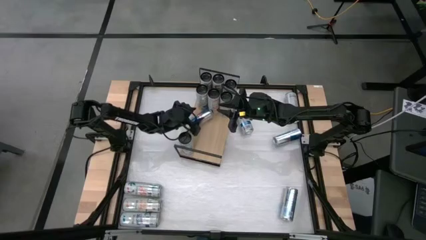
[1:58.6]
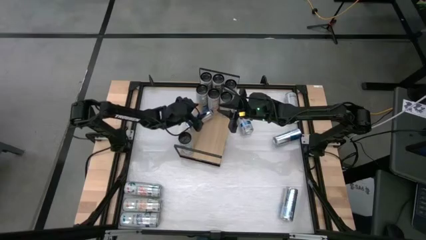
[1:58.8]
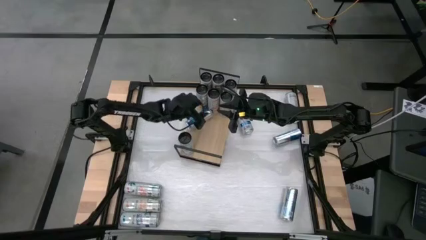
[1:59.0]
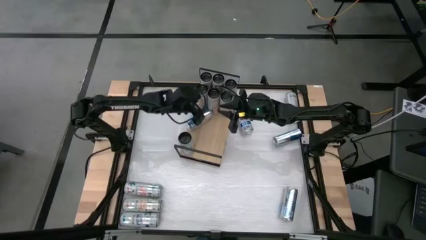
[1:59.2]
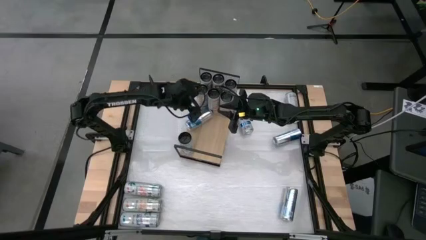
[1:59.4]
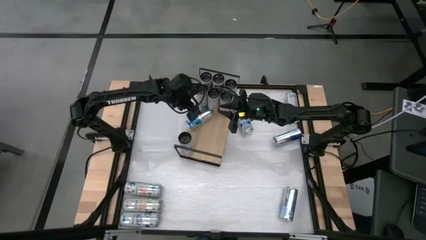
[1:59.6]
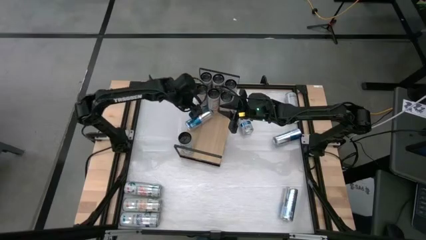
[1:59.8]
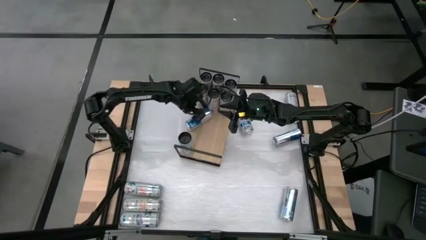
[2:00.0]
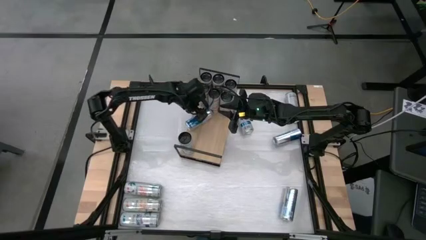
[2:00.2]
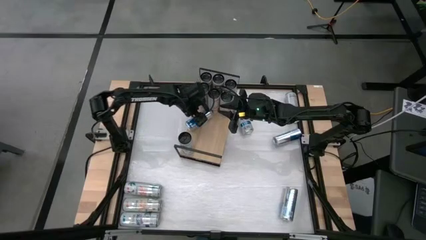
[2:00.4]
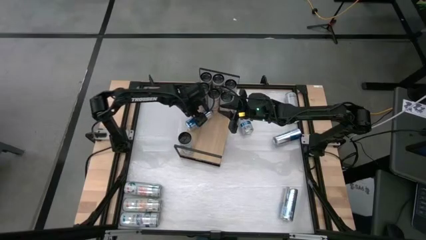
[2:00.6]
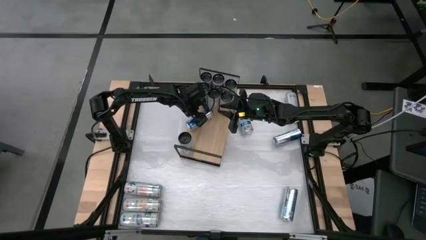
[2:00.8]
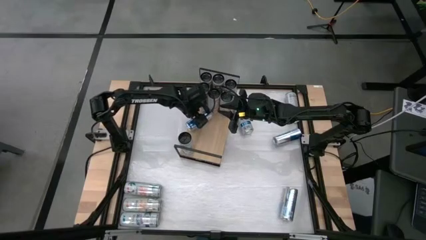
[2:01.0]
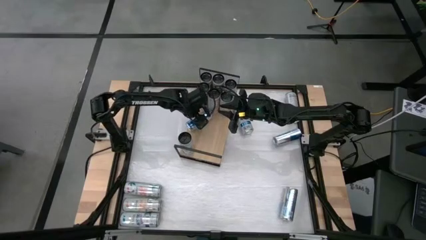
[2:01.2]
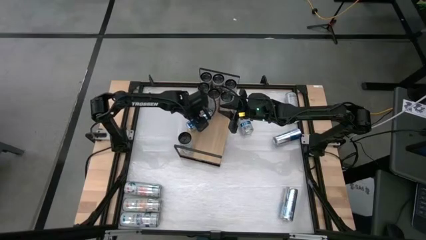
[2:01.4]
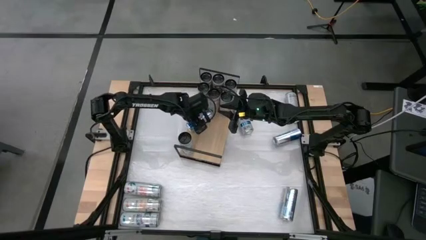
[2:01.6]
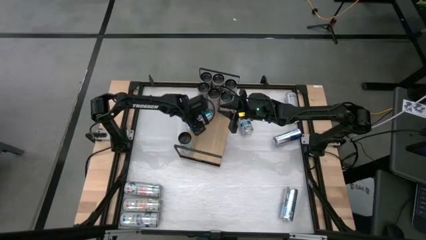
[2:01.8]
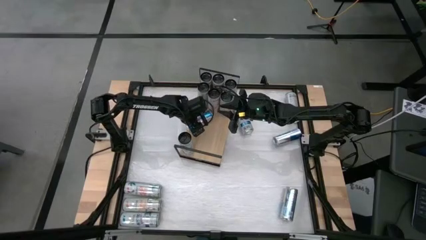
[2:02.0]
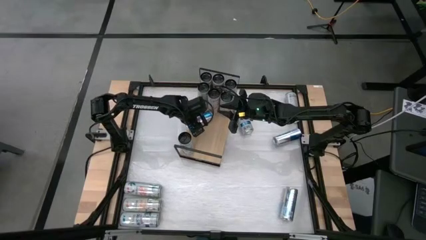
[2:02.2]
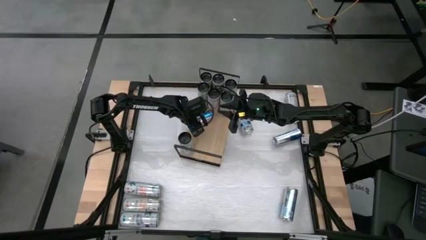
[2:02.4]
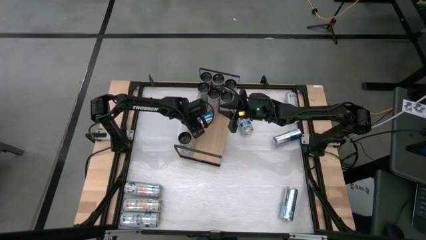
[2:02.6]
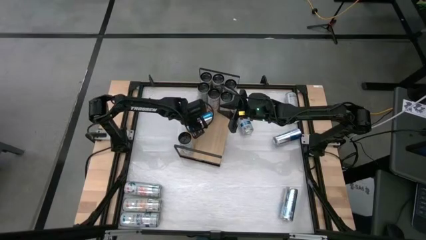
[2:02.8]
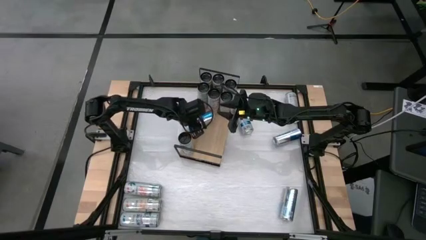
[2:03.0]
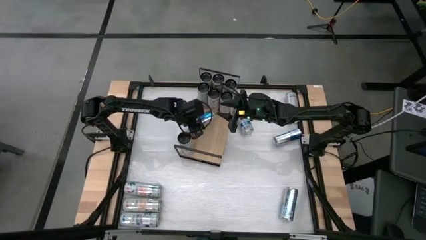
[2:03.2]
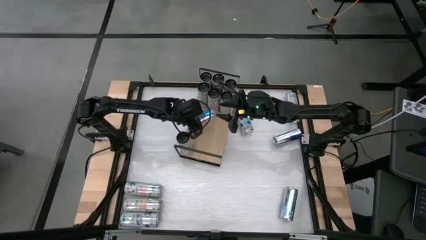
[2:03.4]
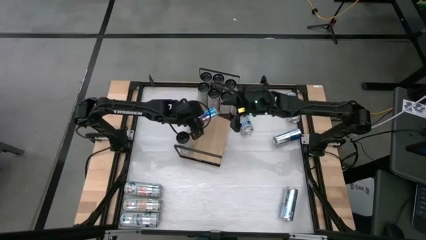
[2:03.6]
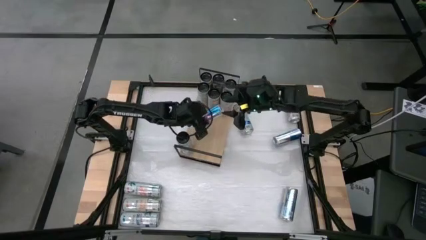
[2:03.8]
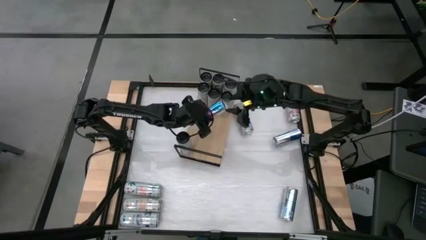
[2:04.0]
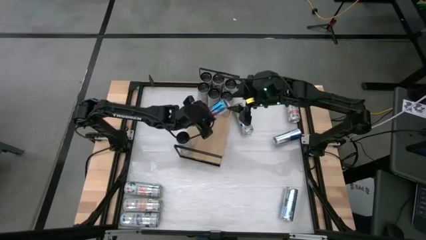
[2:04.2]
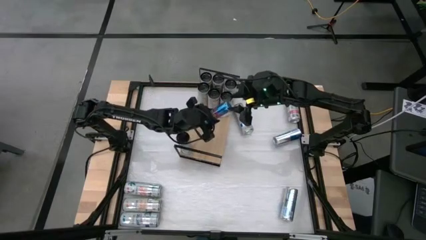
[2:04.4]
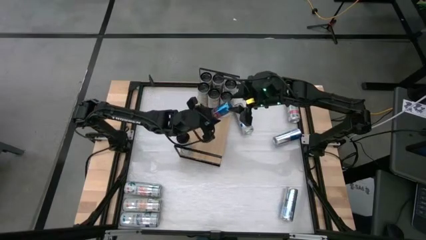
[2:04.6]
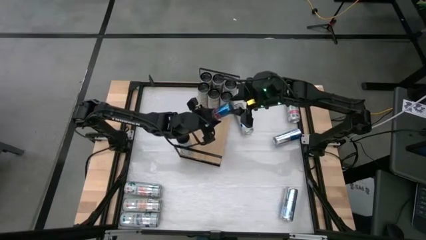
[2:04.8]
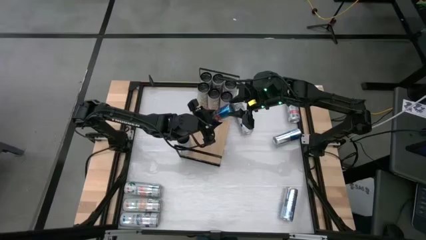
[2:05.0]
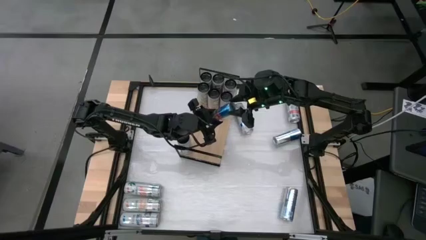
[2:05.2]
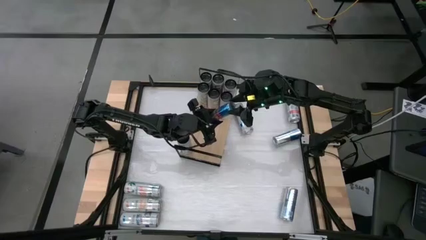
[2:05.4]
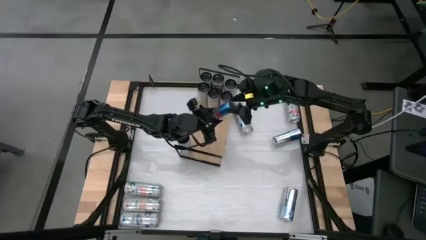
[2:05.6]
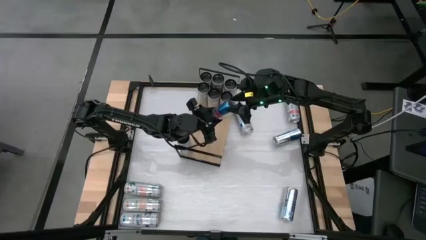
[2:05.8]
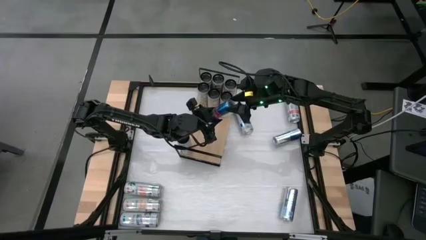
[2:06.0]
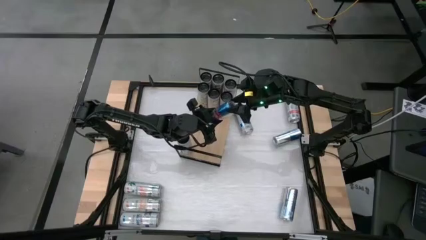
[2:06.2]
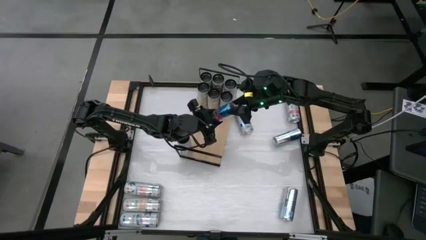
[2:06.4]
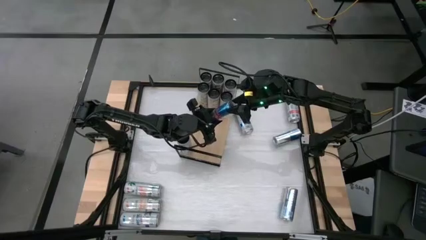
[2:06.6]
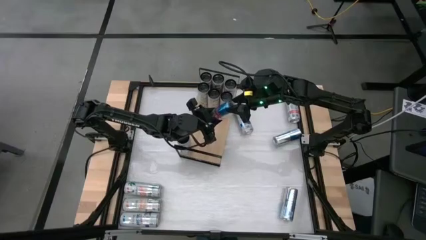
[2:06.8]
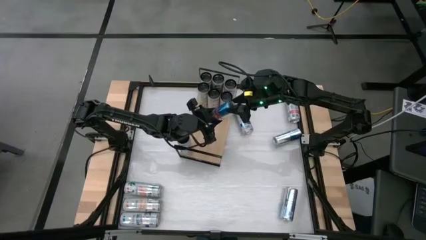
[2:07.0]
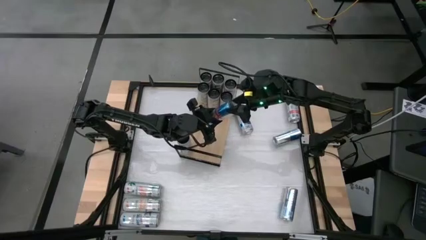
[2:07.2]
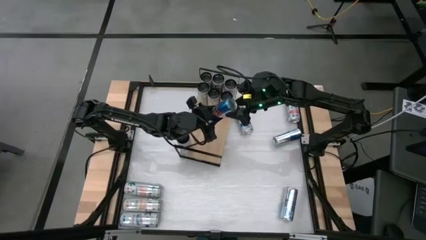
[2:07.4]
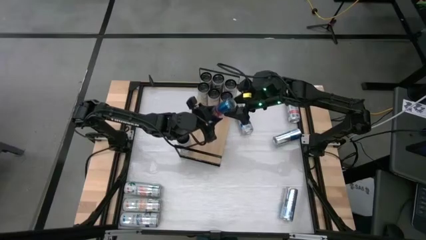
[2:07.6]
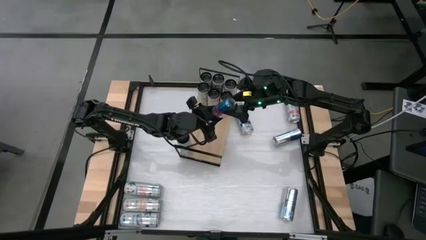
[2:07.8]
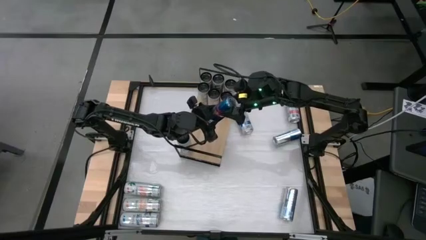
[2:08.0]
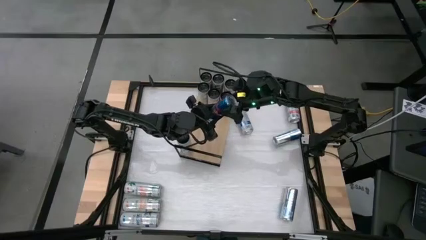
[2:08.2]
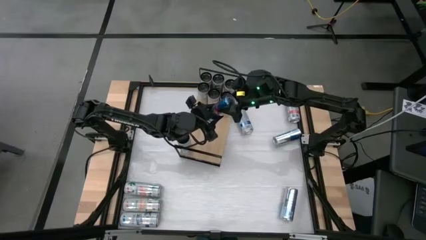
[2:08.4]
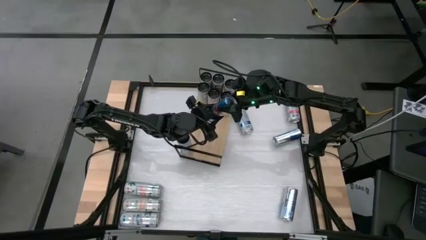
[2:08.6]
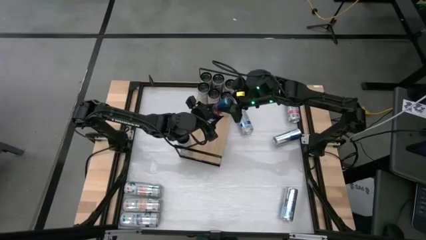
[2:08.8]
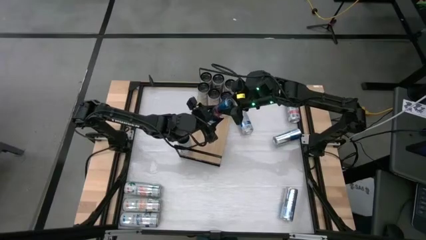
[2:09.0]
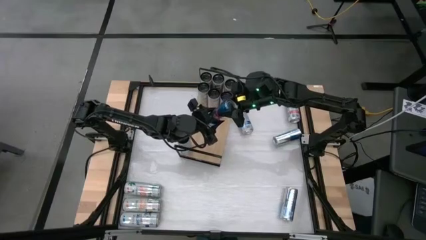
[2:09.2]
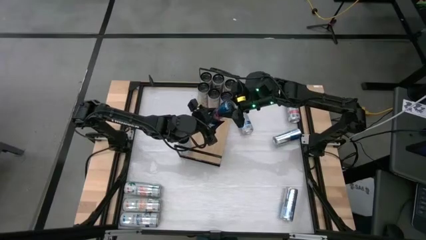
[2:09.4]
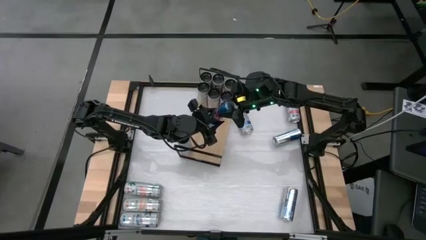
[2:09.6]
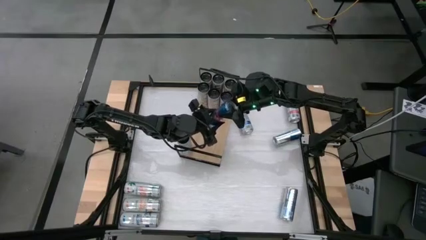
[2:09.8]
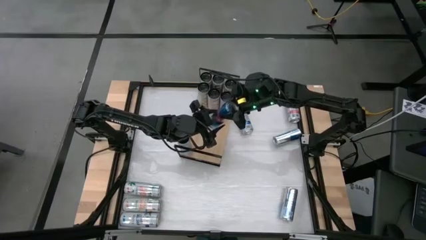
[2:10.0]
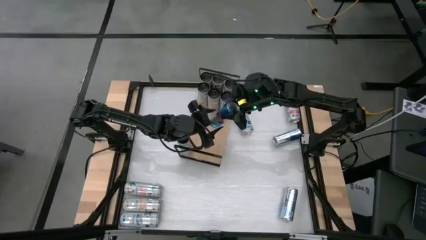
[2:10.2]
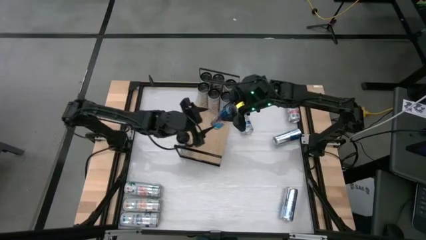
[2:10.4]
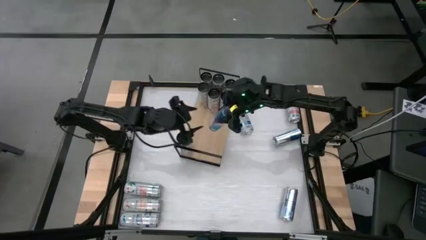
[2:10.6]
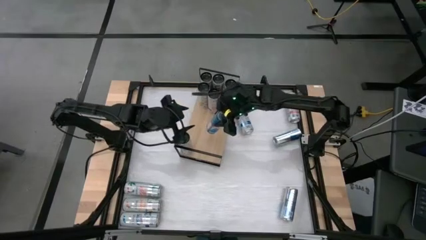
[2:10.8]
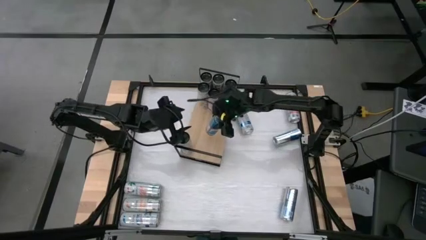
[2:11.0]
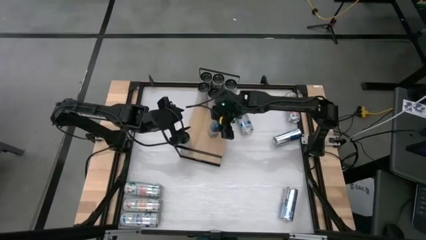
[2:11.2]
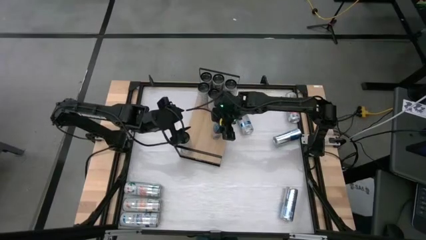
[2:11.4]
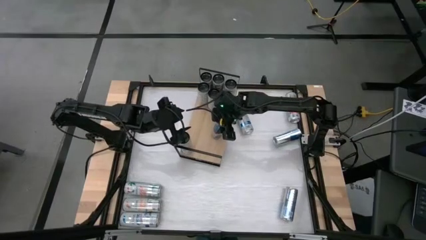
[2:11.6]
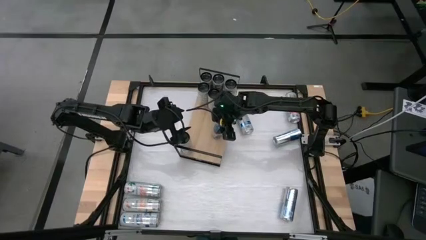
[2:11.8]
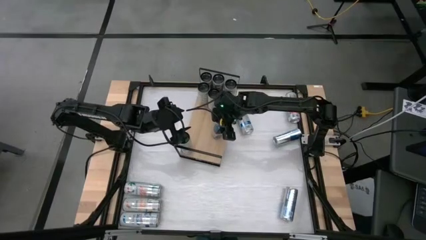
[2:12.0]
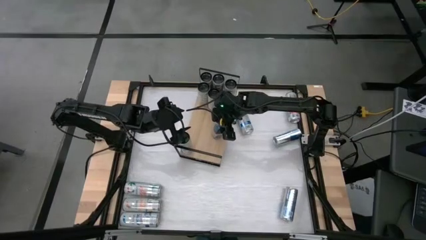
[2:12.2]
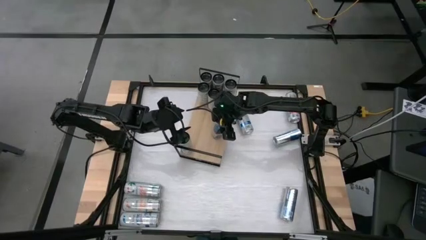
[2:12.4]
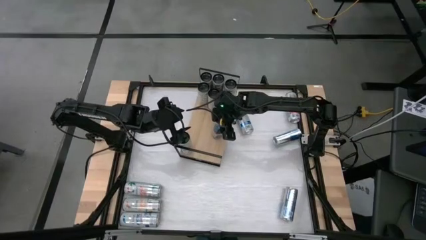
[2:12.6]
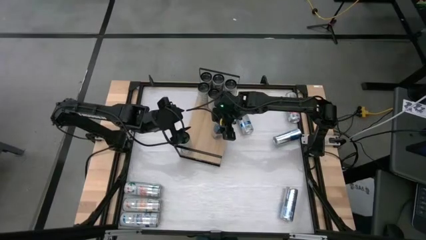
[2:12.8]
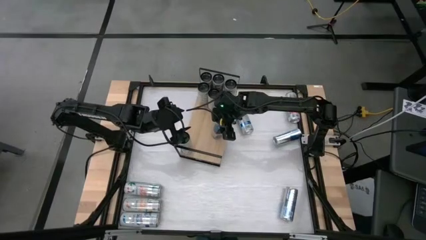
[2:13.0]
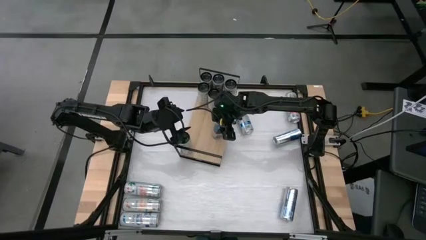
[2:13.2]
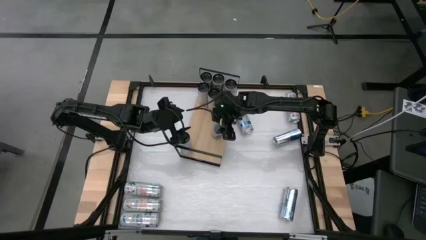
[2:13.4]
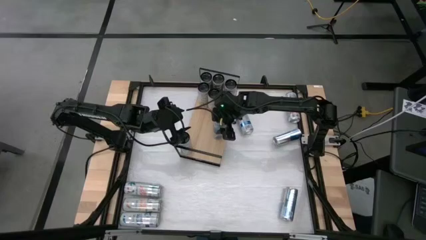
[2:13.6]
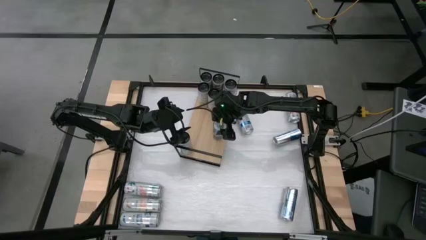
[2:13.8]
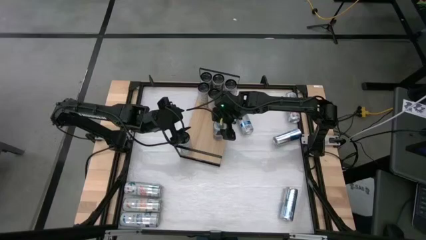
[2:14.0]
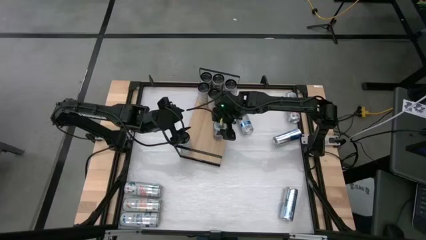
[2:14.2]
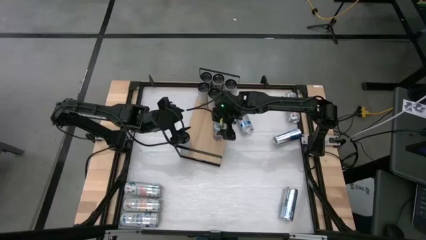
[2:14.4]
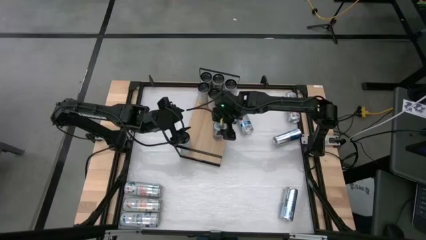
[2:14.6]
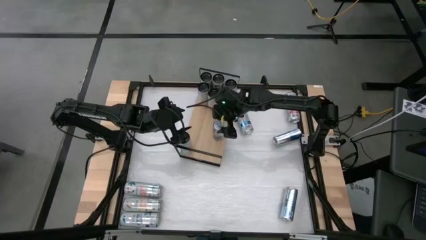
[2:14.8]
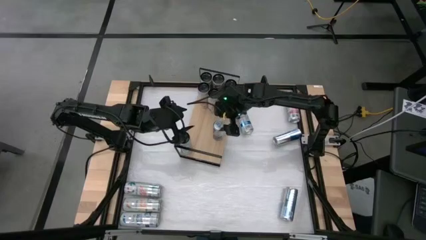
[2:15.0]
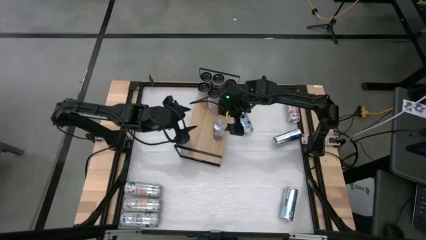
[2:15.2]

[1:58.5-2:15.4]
Task: Place canned beverage on shelf
Put the middle left silver soda can on the shelf
